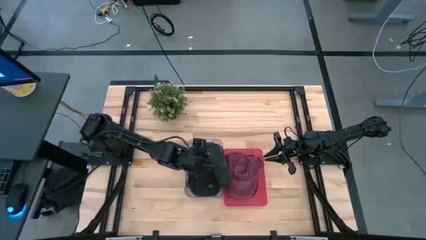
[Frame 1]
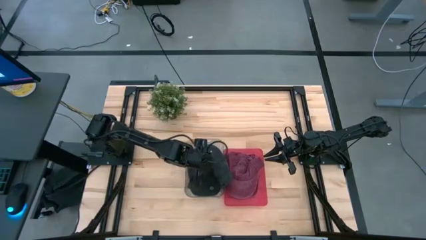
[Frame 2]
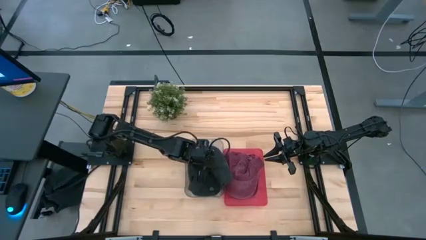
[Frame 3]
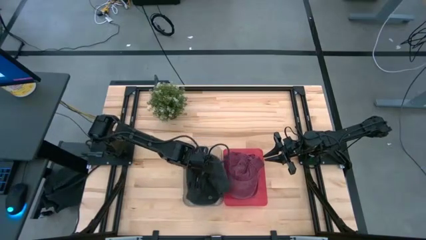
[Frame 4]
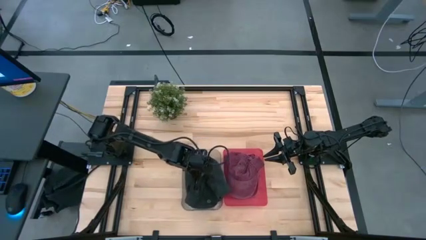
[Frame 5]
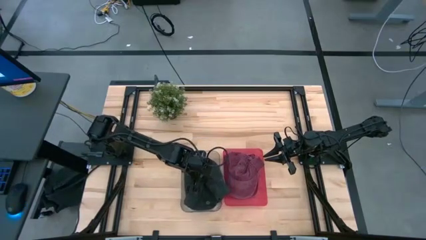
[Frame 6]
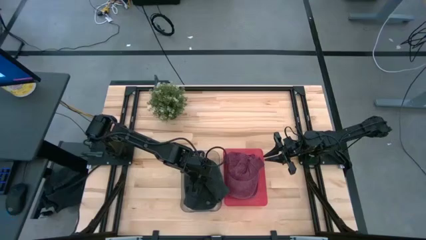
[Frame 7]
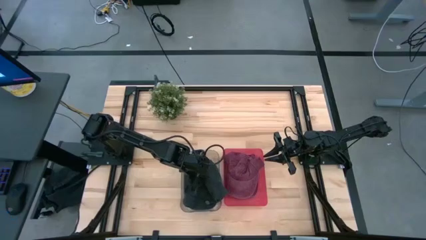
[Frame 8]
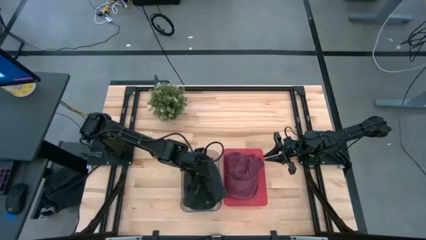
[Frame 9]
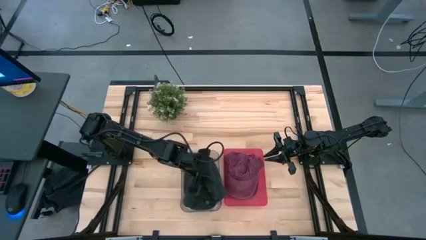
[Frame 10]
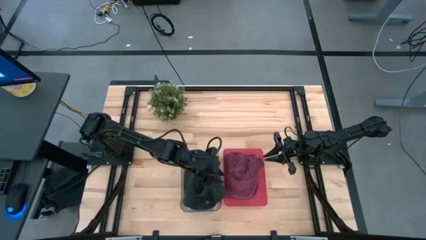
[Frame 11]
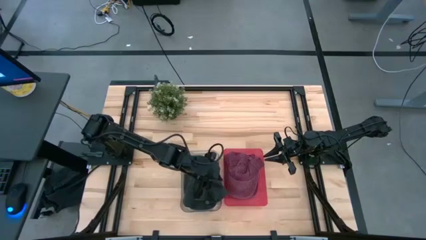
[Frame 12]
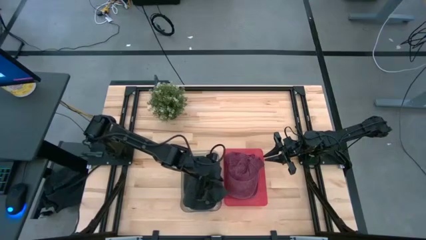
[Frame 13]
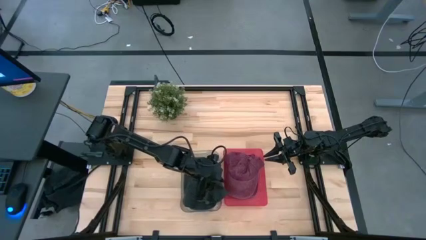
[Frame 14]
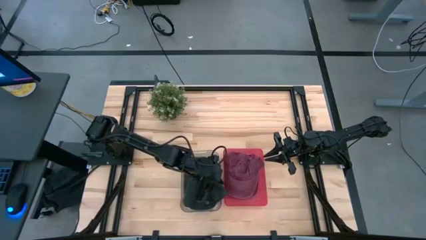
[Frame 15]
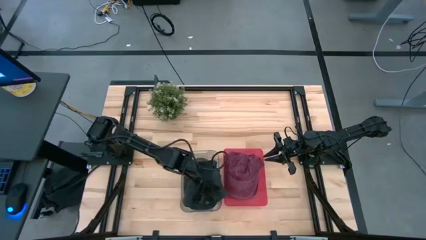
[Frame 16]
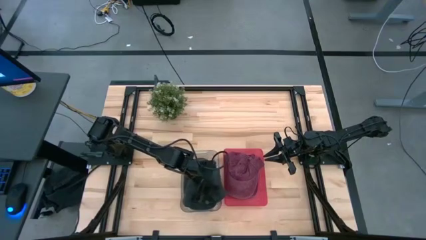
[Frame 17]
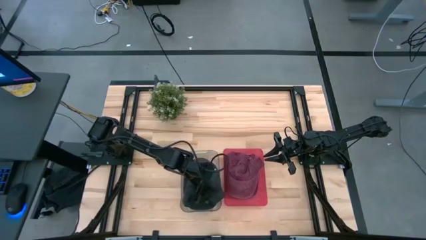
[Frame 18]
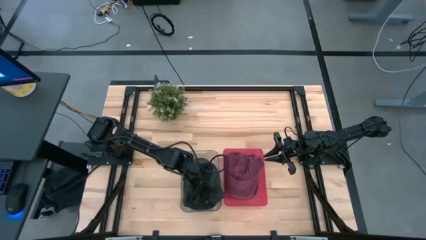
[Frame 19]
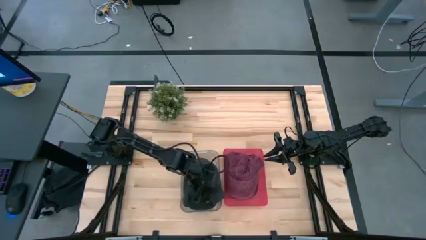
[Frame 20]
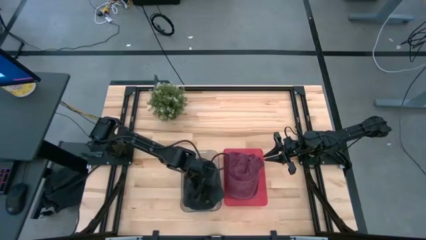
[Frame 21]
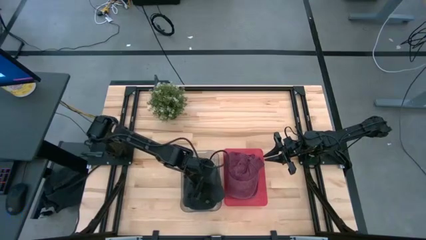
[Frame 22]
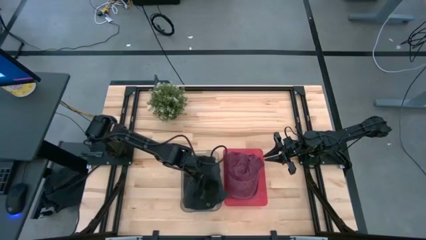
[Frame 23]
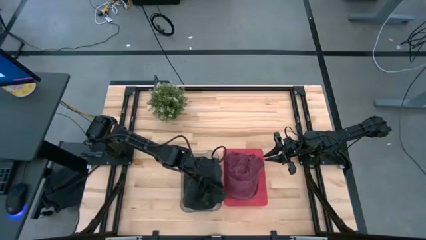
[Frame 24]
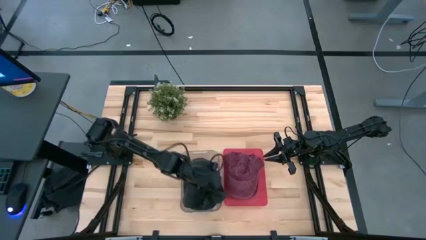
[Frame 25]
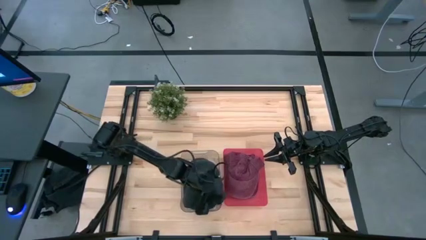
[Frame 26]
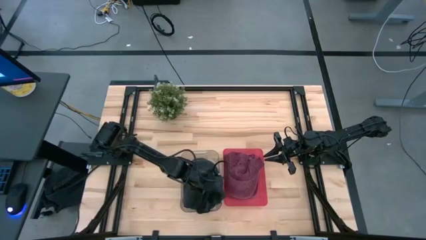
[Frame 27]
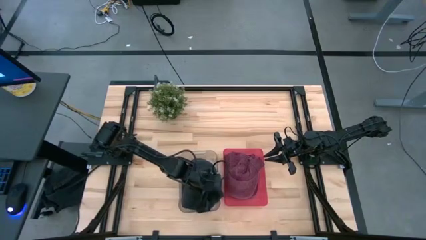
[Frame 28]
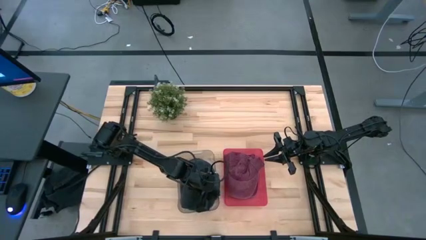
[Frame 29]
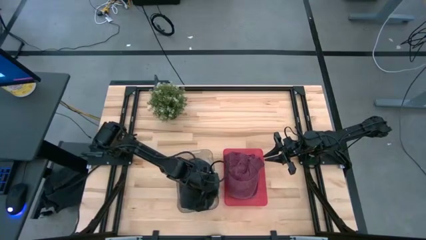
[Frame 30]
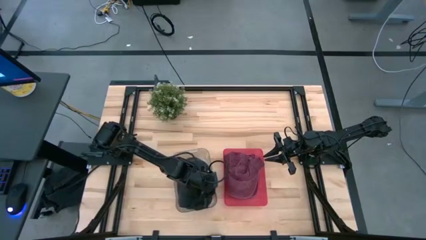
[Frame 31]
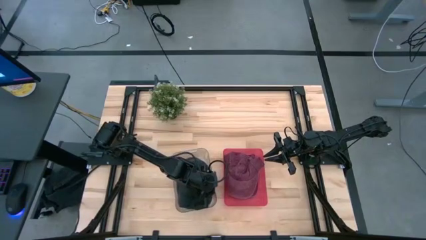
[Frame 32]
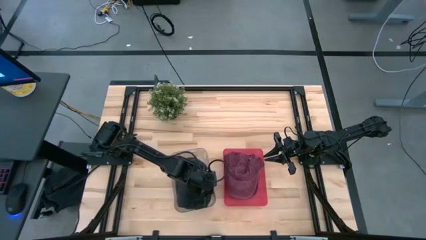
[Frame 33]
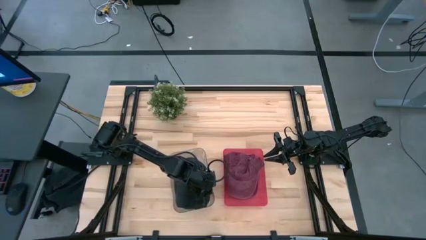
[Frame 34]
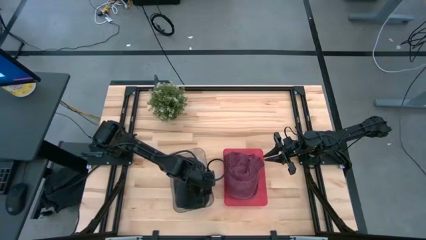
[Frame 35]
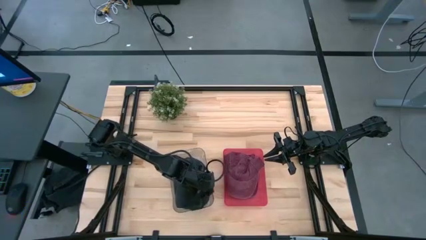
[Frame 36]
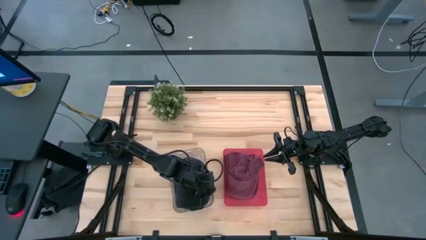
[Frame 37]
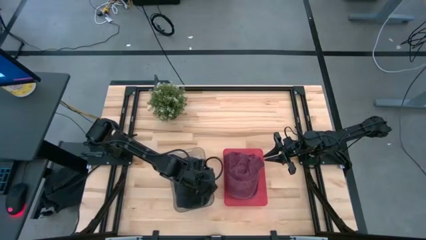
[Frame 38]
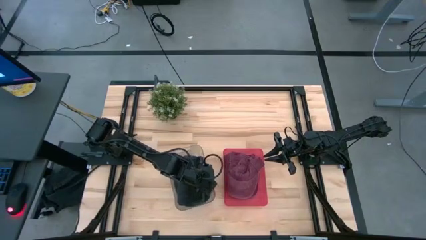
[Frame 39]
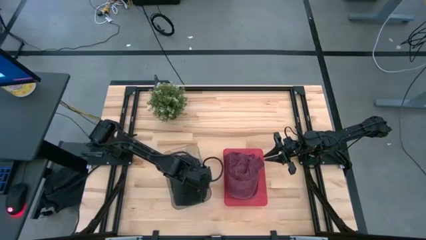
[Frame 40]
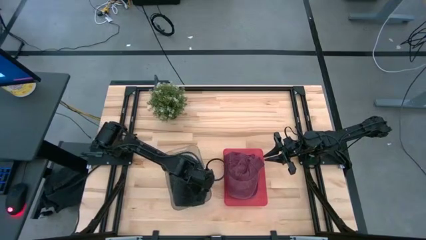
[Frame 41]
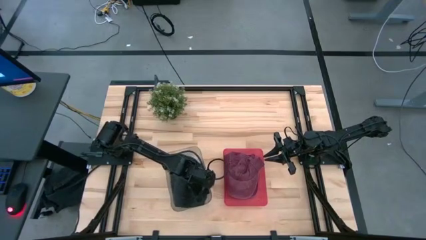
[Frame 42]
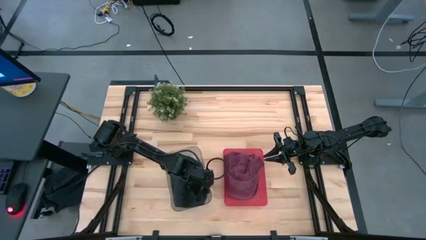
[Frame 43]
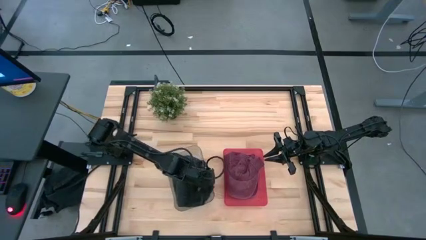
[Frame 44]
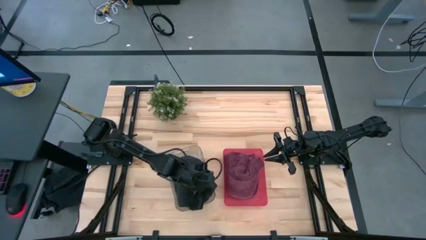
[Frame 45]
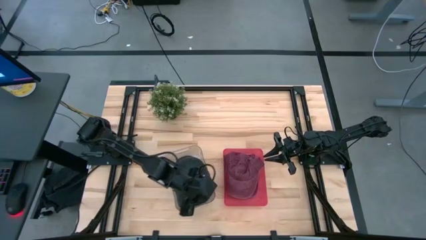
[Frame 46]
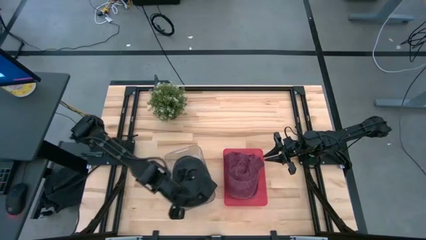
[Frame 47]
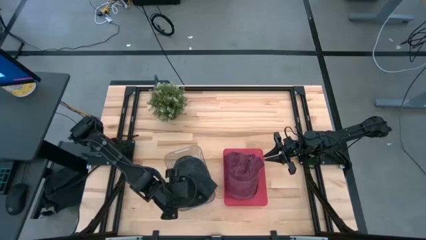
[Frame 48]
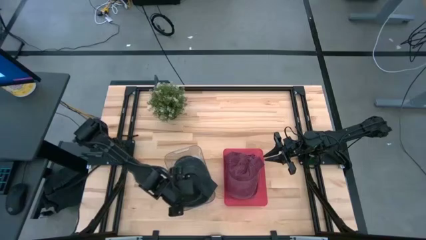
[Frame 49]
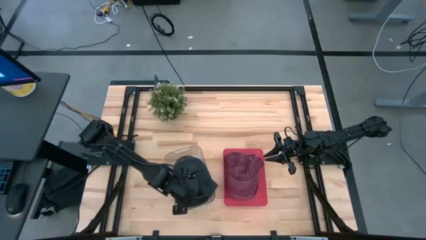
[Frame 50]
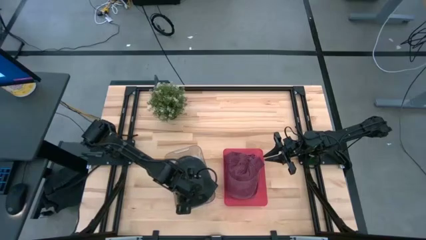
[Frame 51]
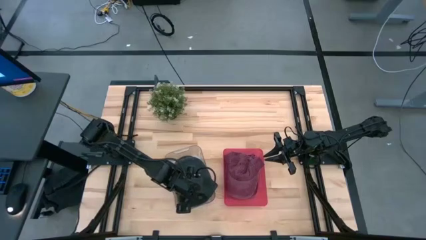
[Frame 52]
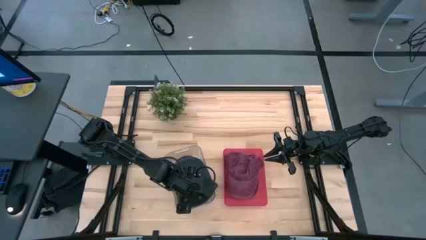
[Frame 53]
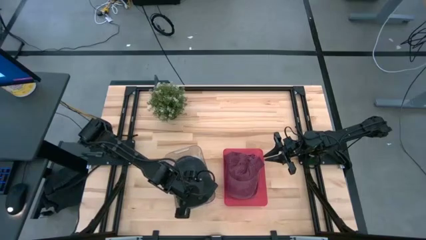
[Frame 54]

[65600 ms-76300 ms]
Task: Pick & Place hat
Put the black cap into the transparent bin

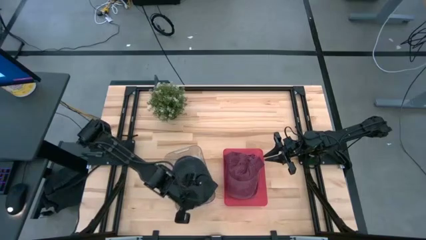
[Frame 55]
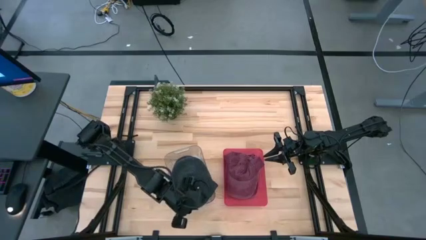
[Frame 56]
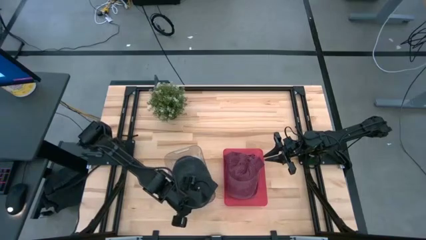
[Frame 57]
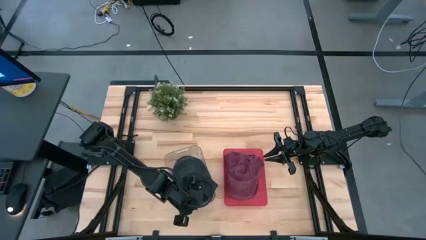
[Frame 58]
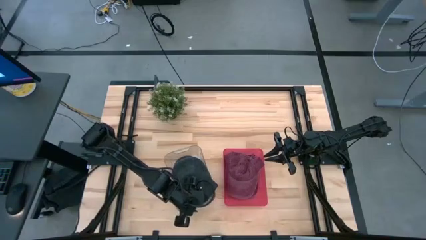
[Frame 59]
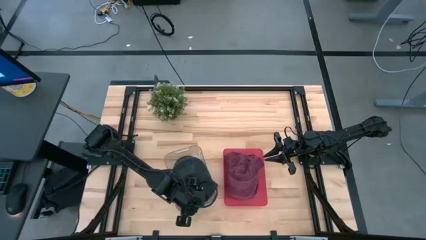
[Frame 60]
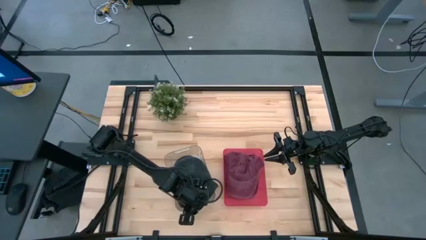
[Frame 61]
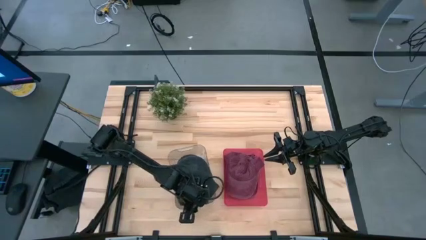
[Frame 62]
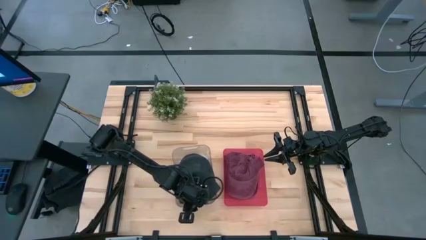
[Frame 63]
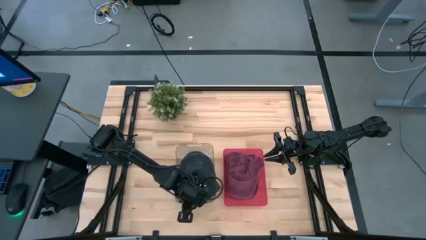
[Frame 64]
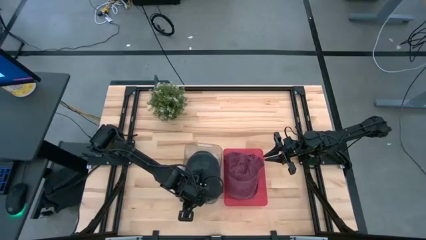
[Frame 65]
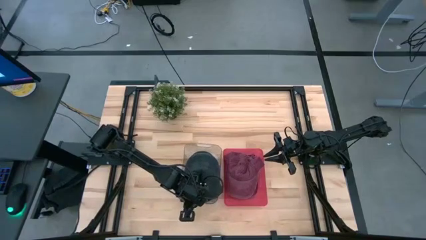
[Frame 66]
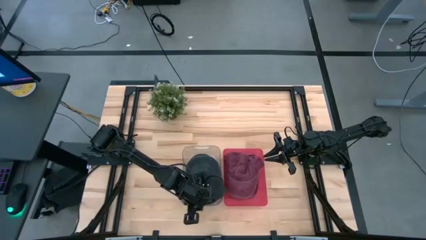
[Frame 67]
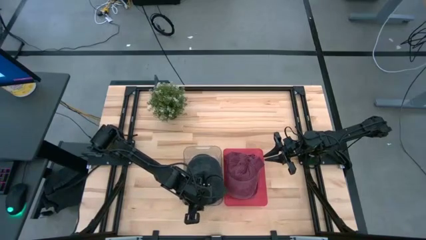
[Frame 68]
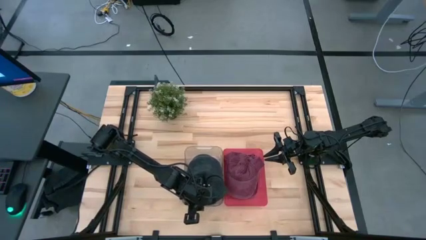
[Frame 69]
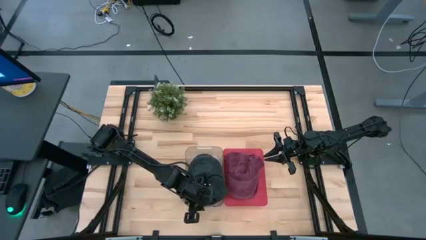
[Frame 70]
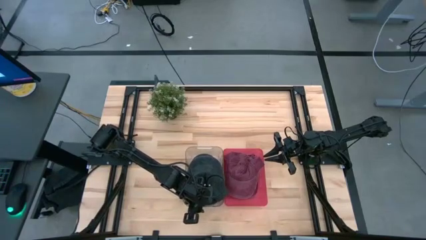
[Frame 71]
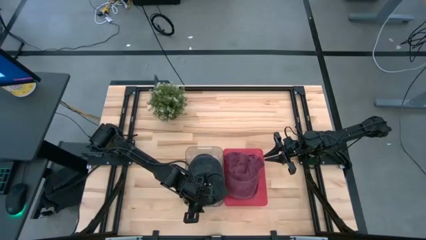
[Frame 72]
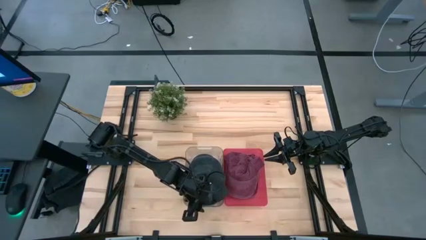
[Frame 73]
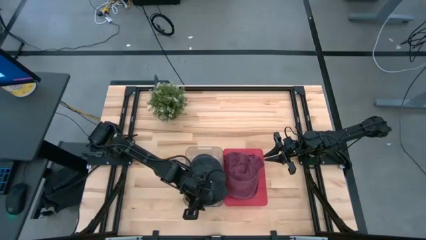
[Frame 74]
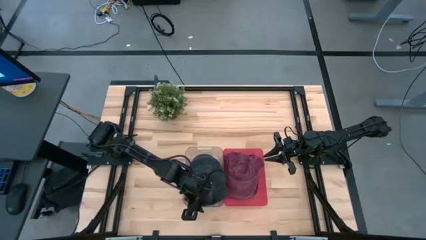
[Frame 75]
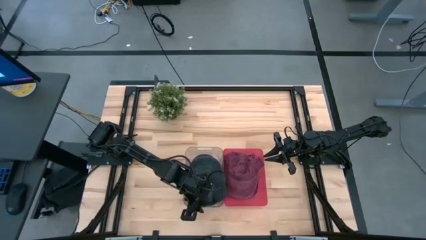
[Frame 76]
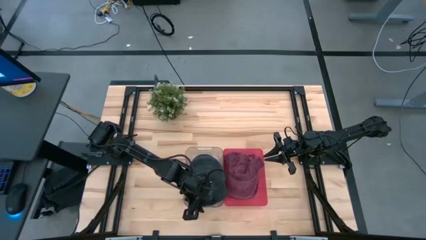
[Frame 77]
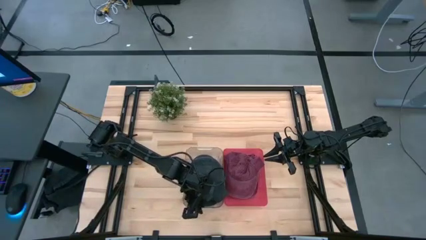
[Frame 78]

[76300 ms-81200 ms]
Adjust the transparent bin on the table
